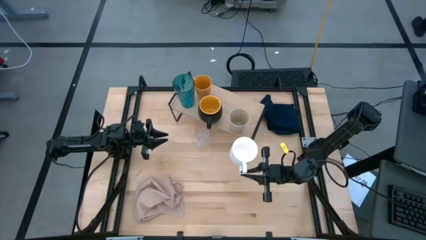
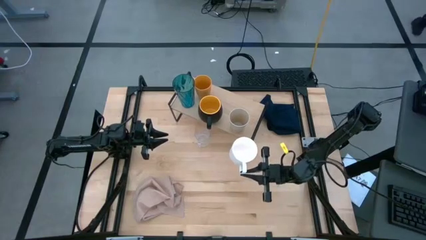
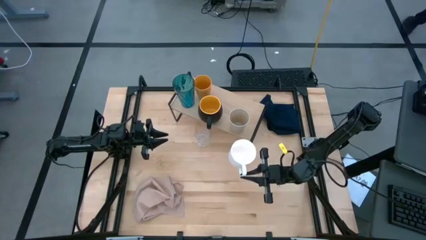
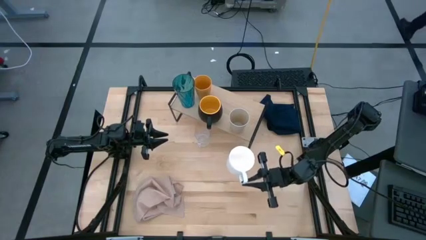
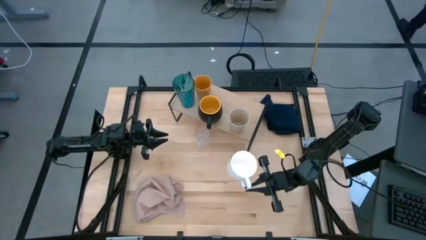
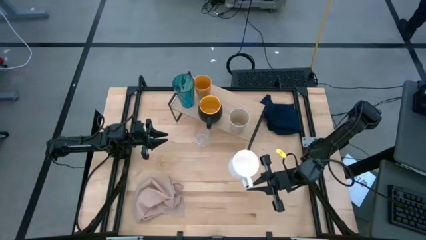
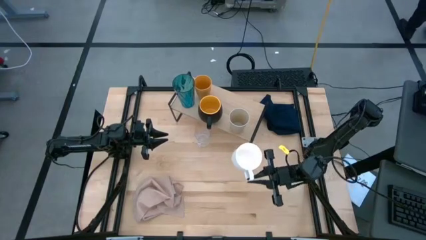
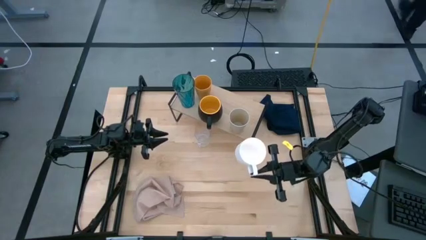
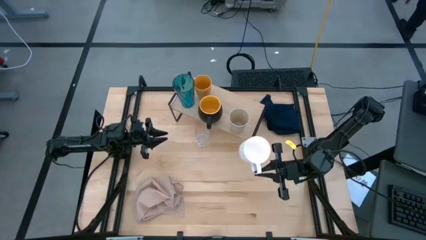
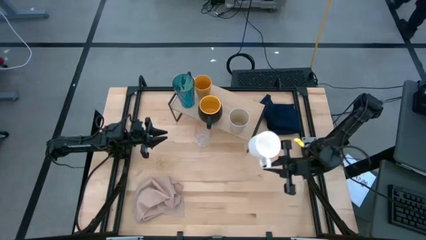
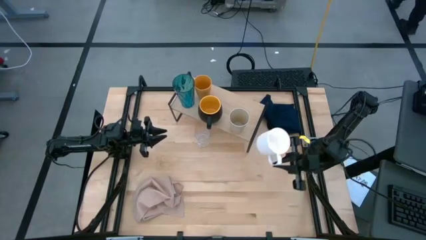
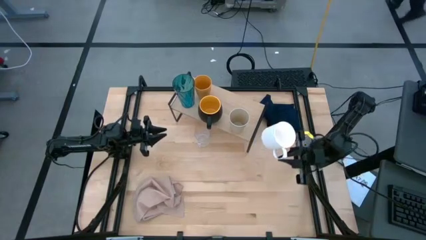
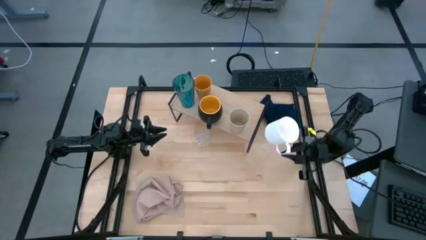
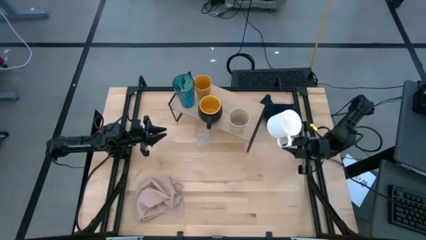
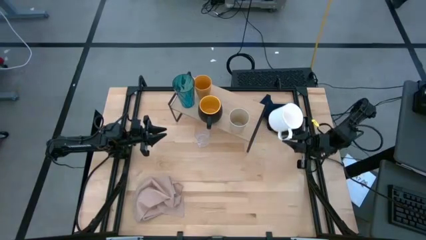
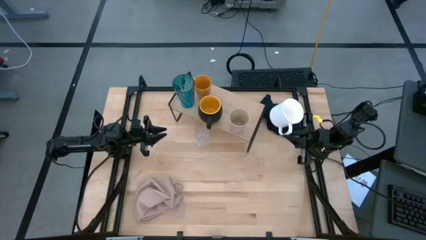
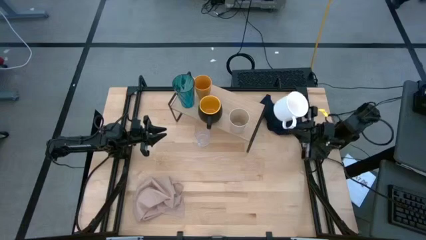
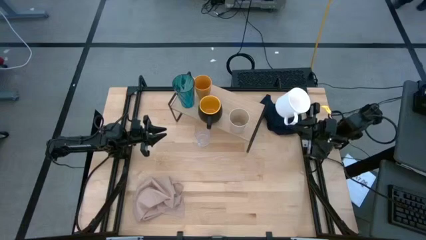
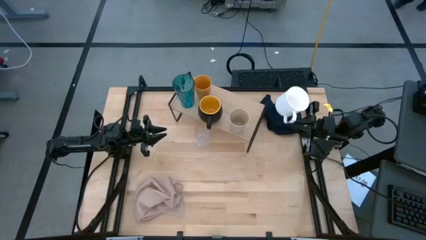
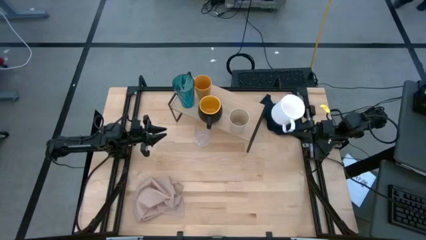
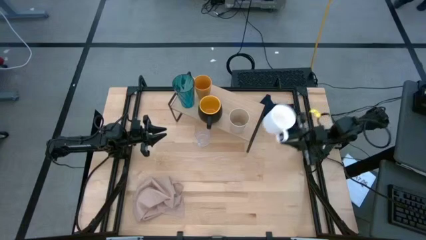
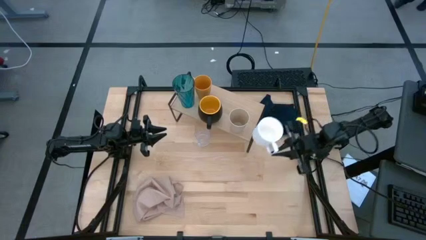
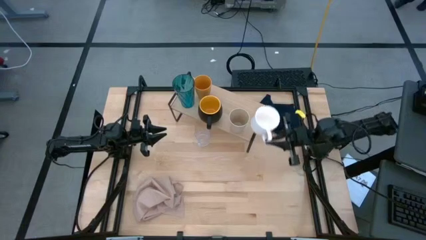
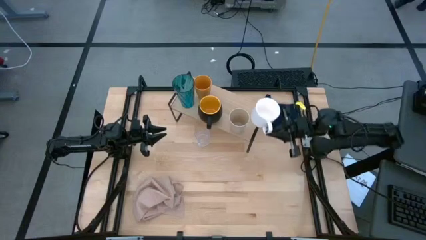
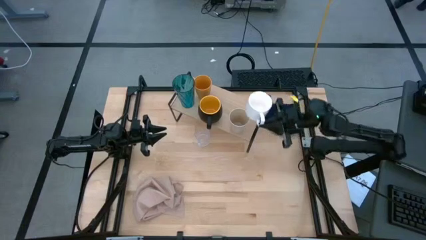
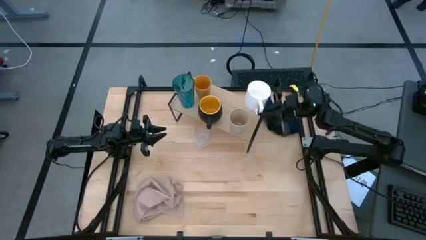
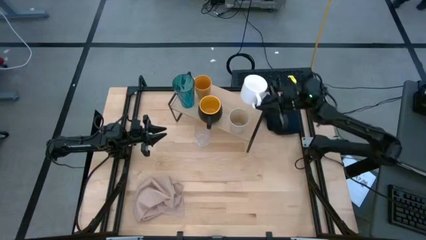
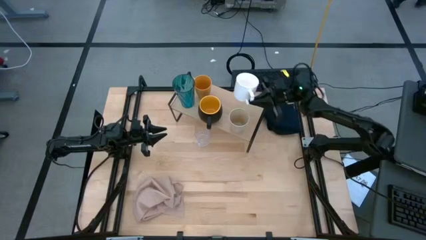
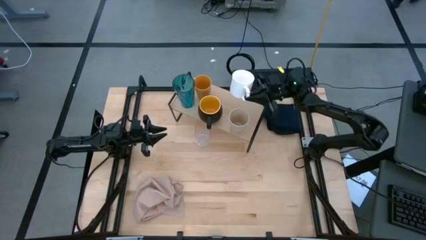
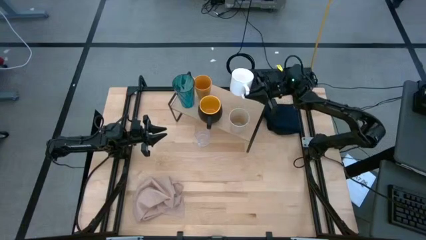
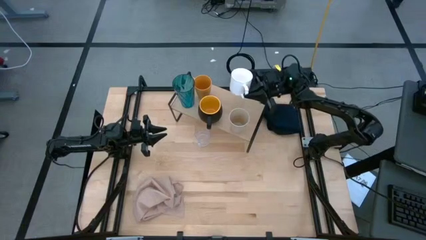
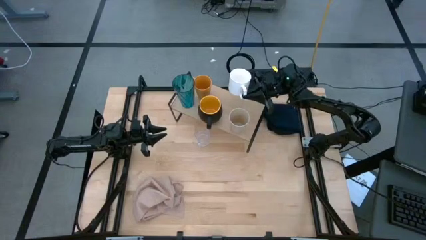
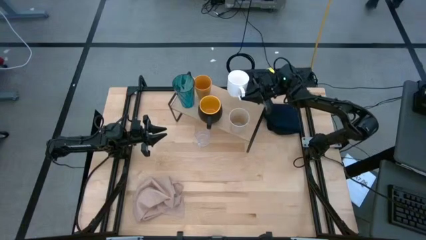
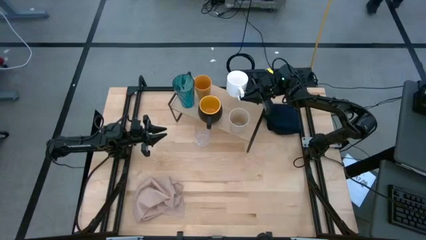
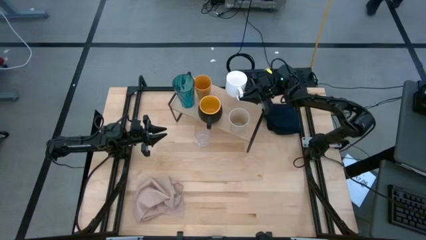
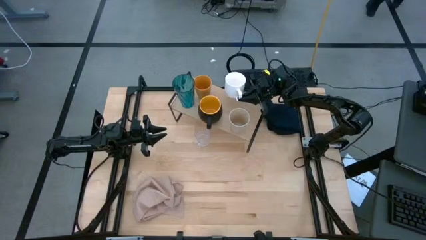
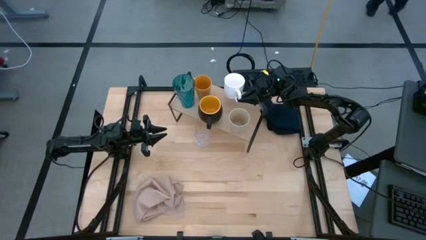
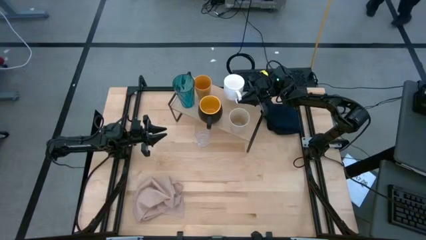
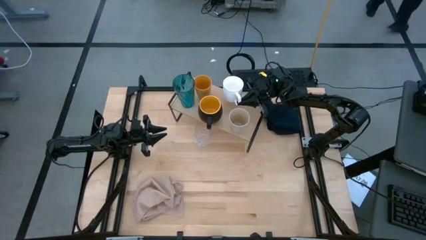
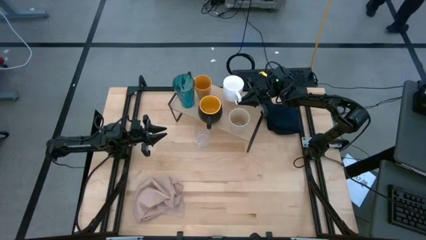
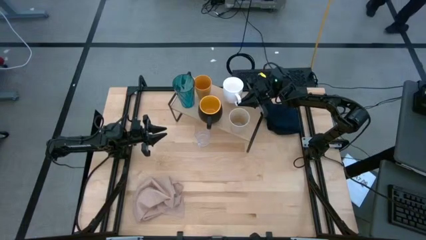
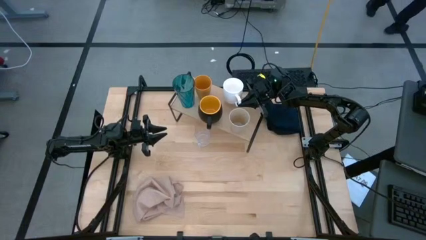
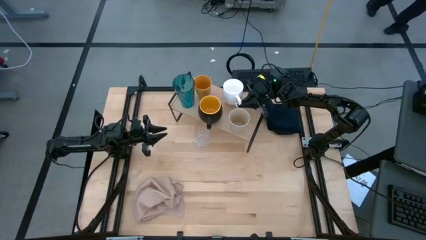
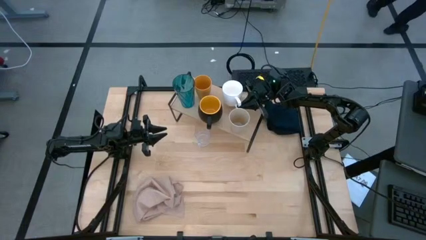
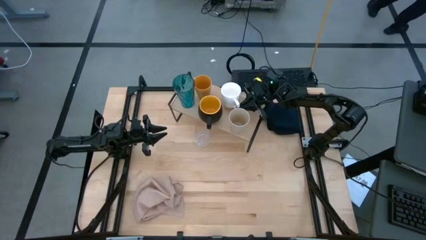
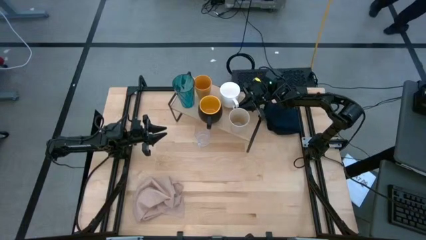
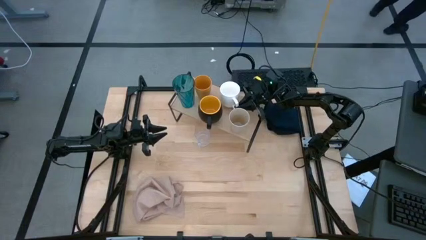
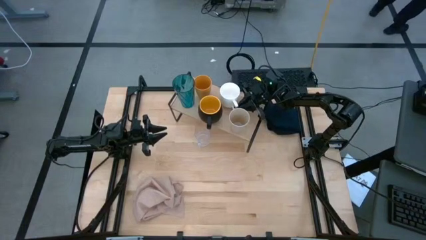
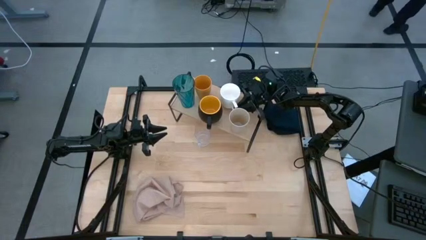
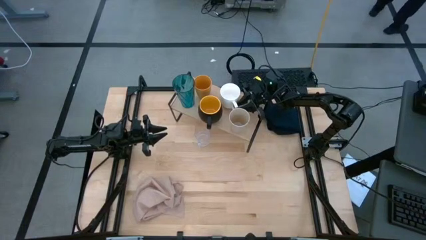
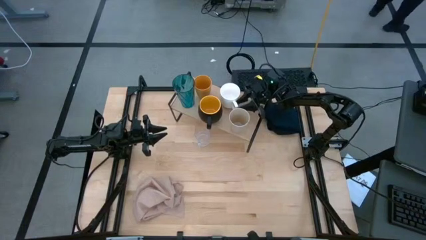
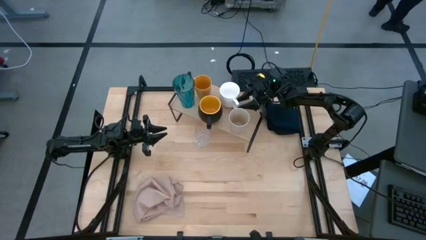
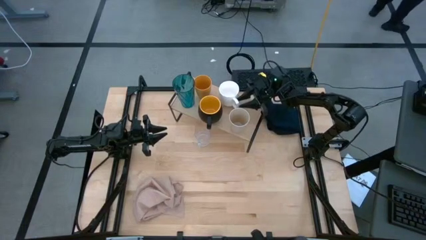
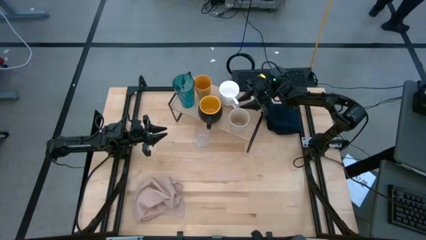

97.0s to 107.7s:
Task: Stack small to large cups/mugs on shelf
Put the white mug on the shelf
